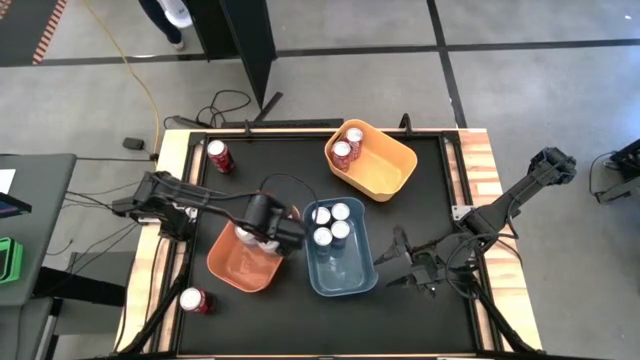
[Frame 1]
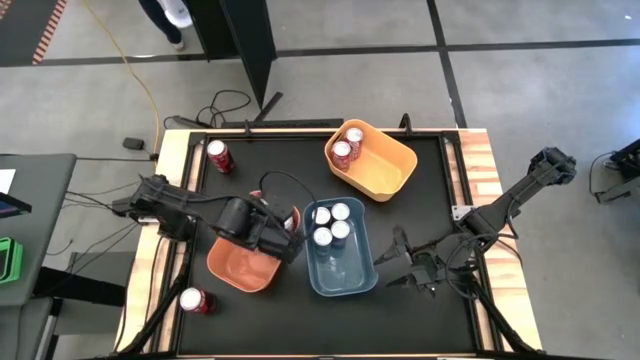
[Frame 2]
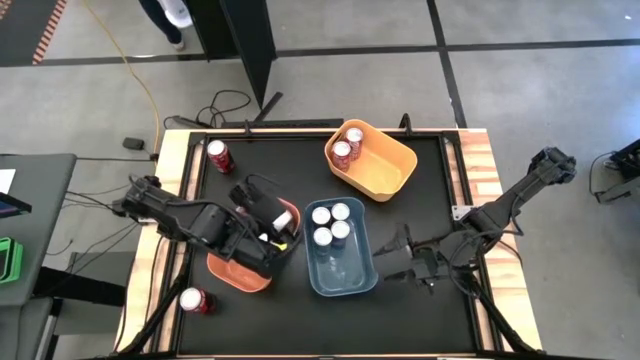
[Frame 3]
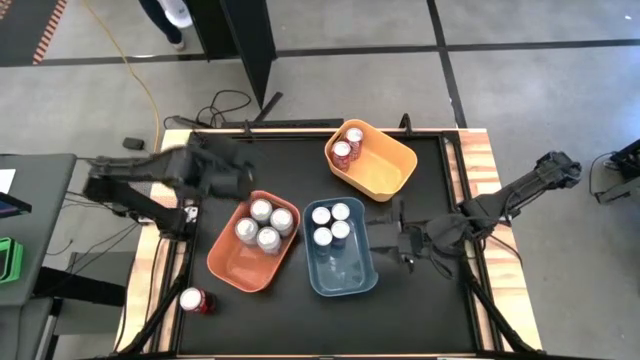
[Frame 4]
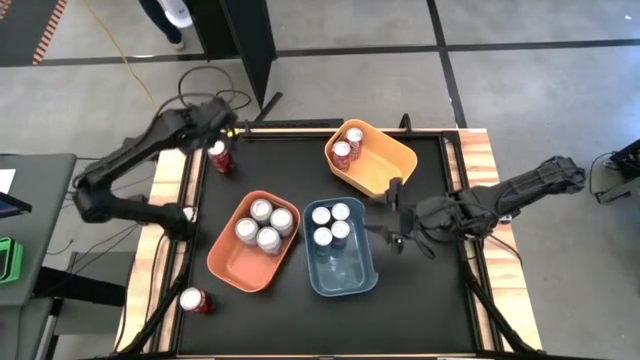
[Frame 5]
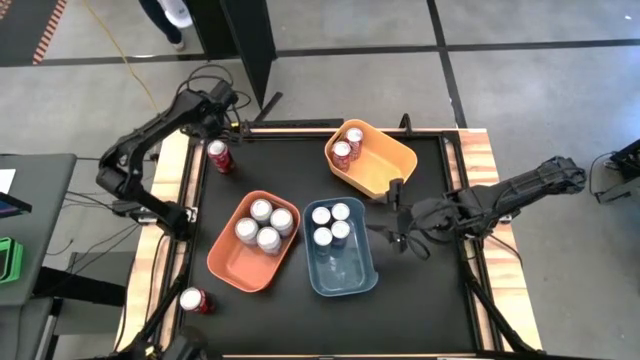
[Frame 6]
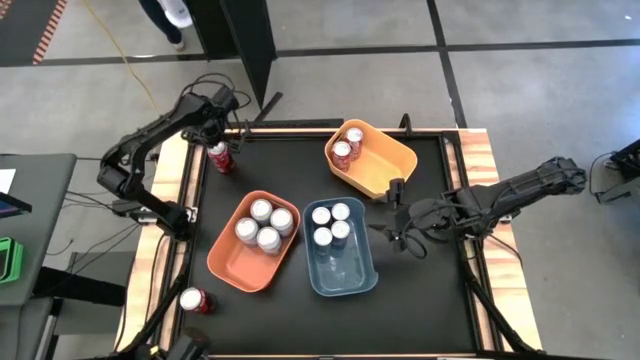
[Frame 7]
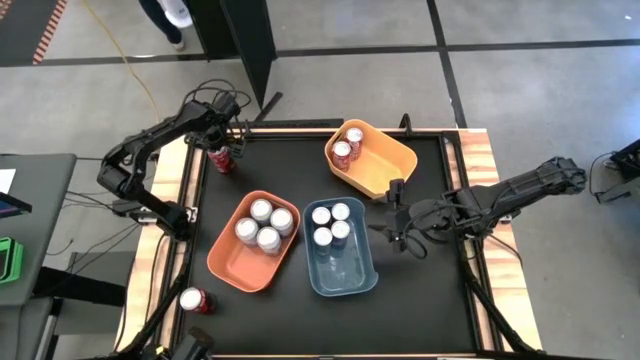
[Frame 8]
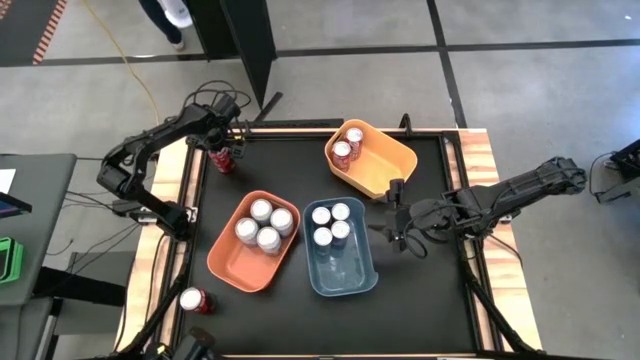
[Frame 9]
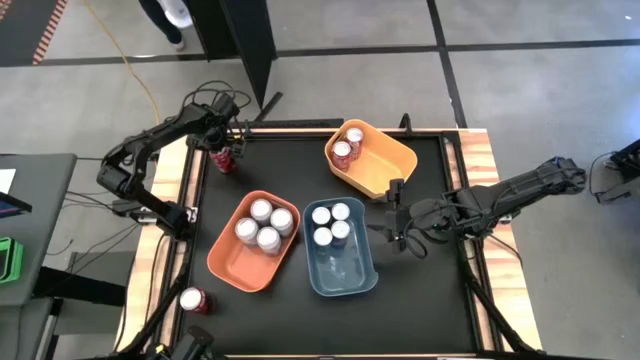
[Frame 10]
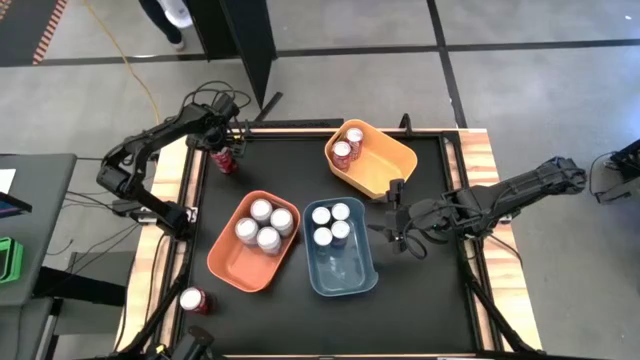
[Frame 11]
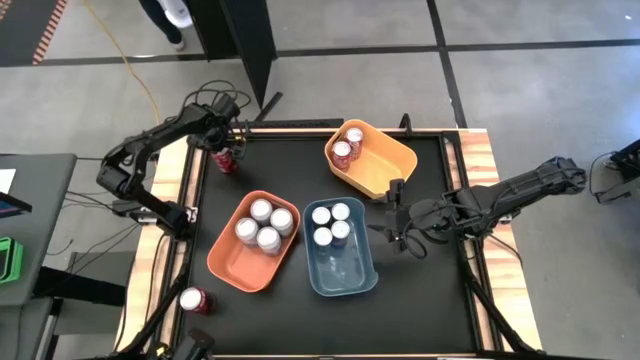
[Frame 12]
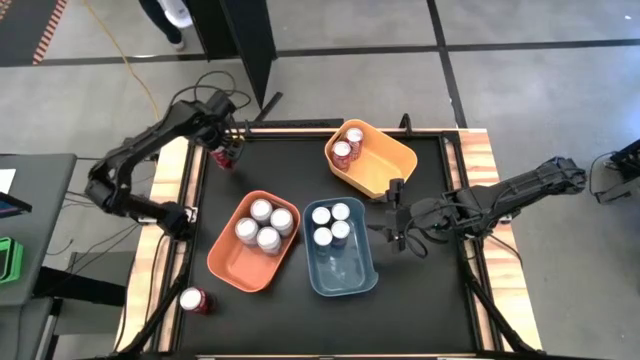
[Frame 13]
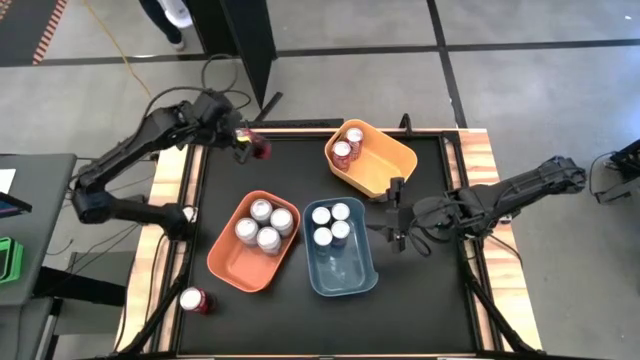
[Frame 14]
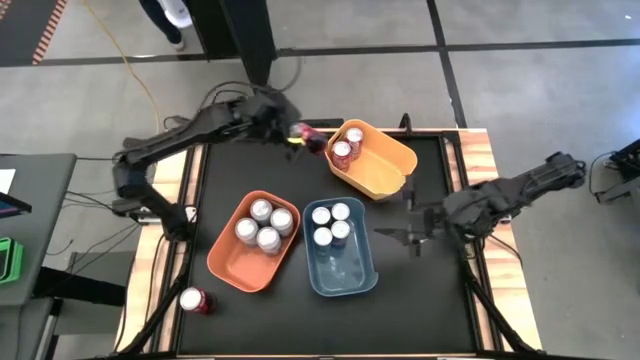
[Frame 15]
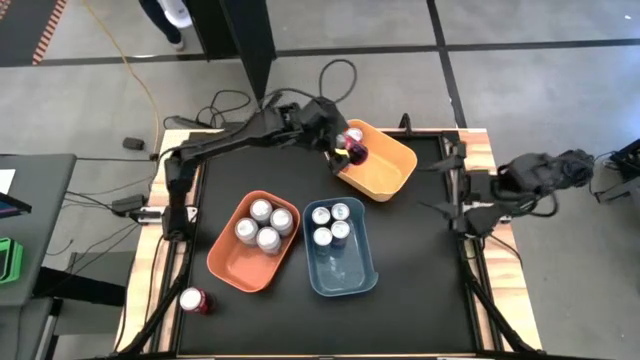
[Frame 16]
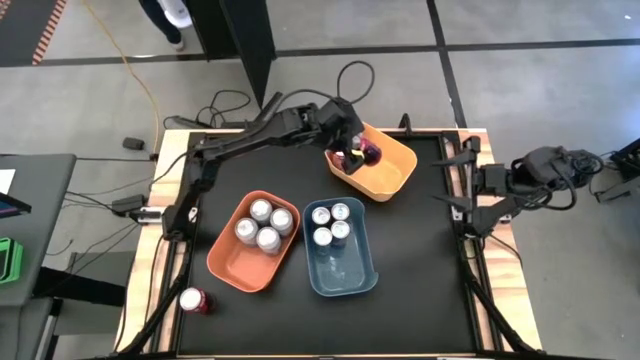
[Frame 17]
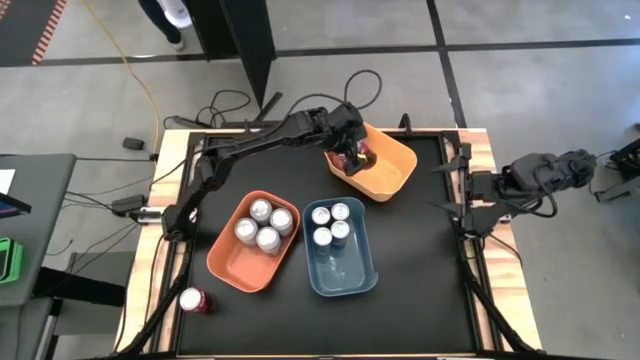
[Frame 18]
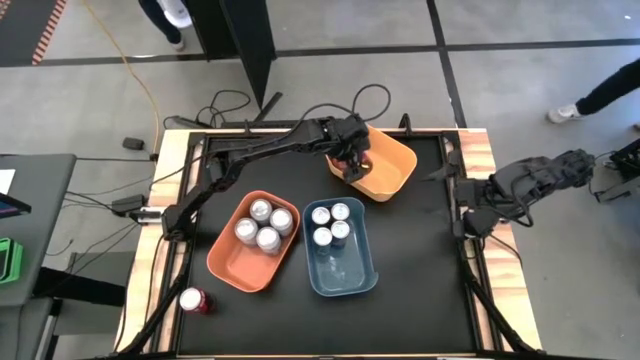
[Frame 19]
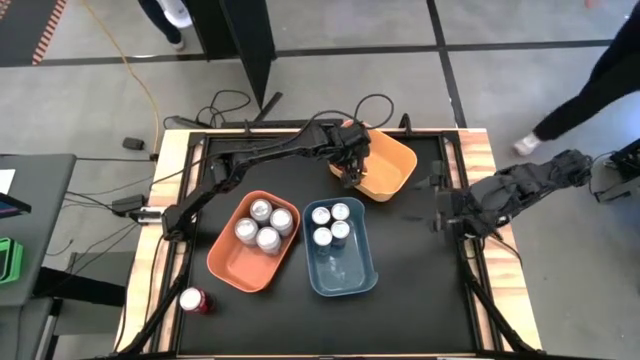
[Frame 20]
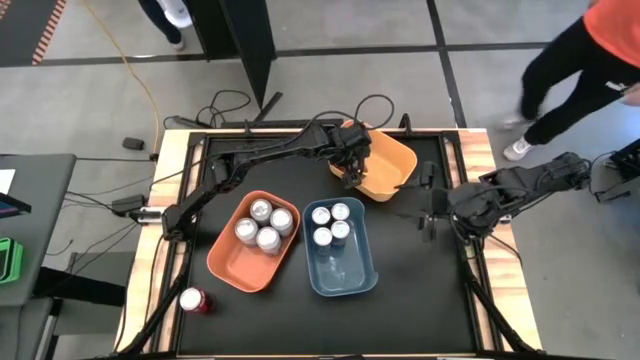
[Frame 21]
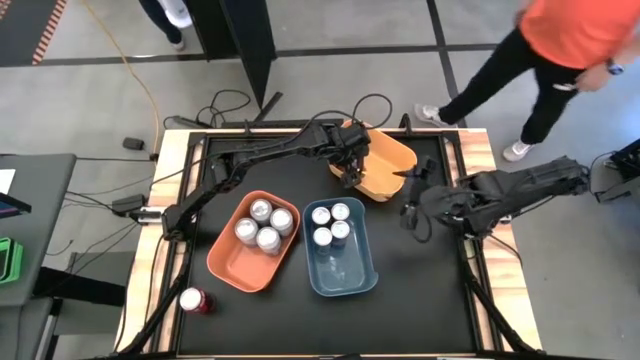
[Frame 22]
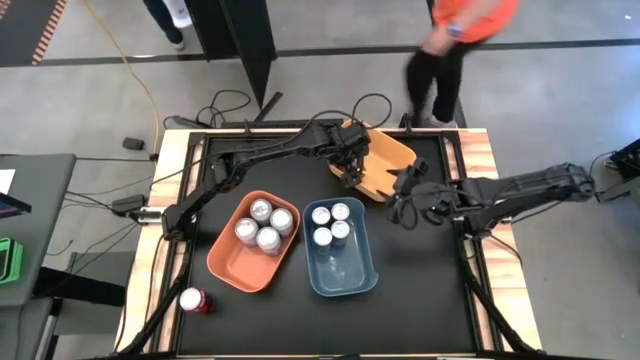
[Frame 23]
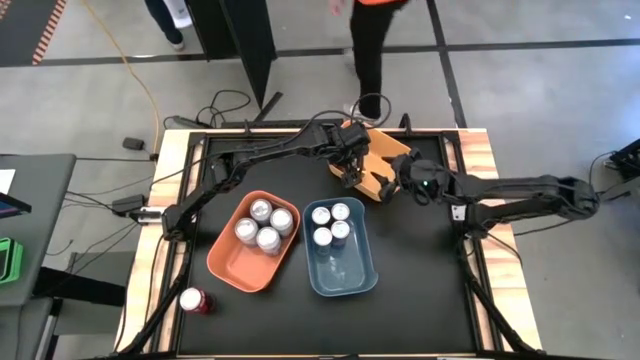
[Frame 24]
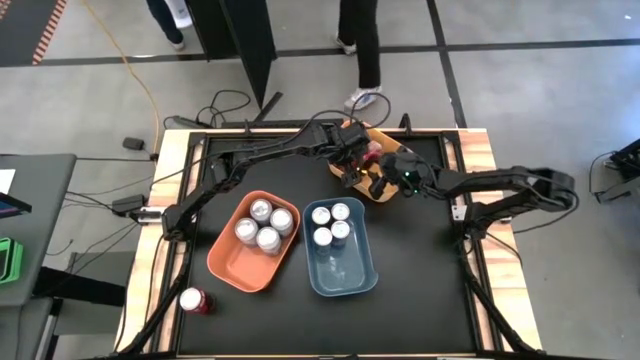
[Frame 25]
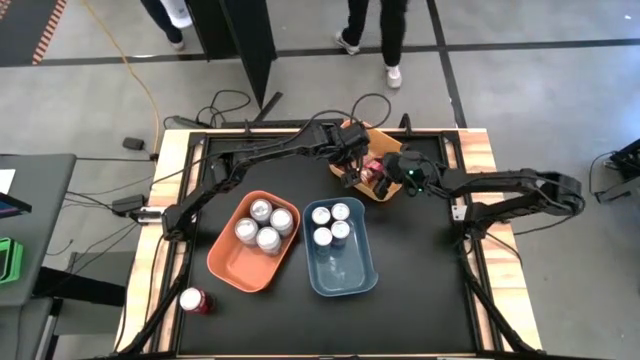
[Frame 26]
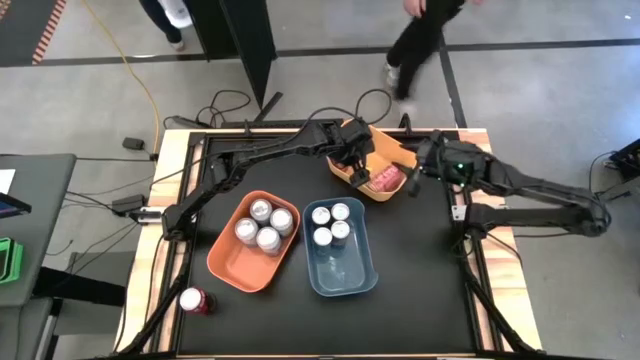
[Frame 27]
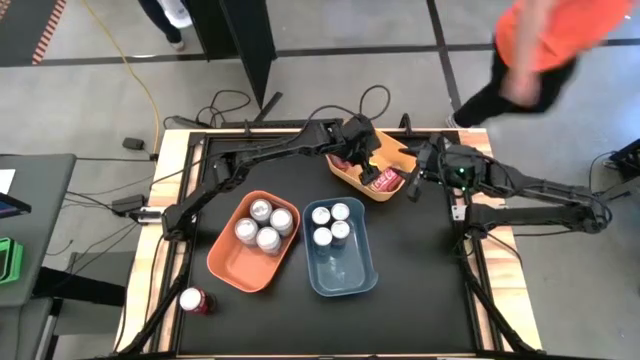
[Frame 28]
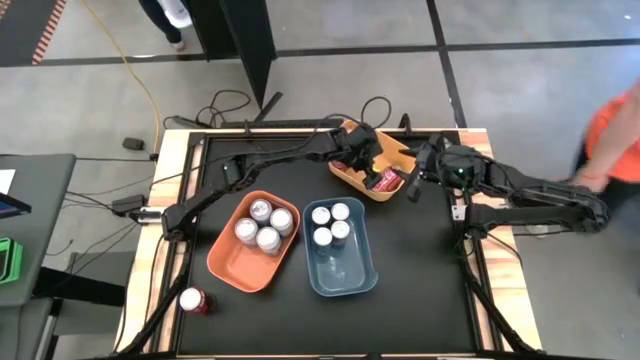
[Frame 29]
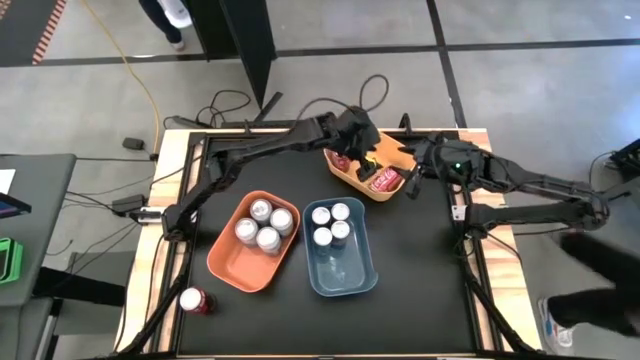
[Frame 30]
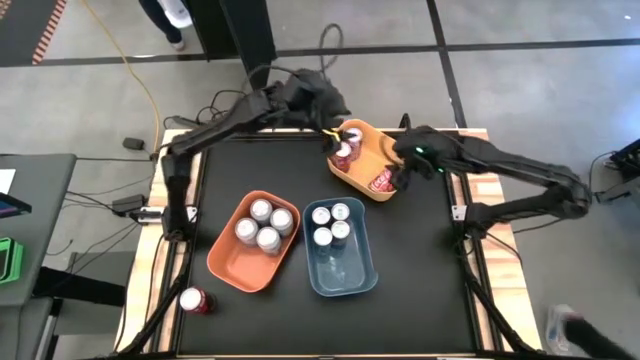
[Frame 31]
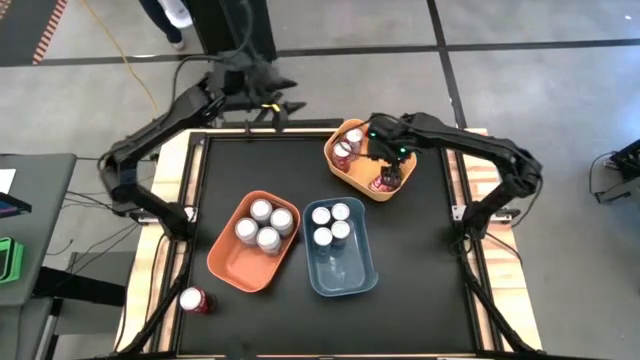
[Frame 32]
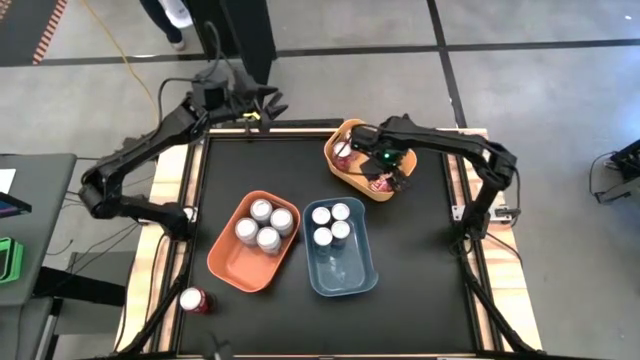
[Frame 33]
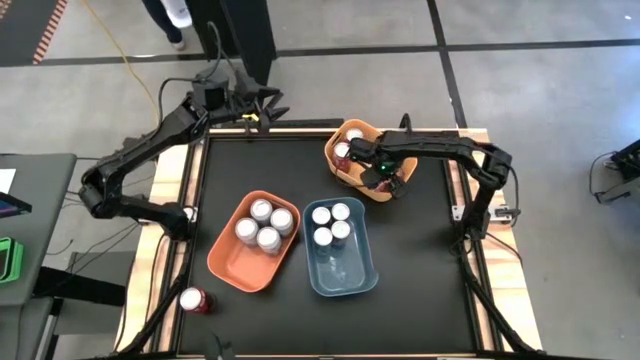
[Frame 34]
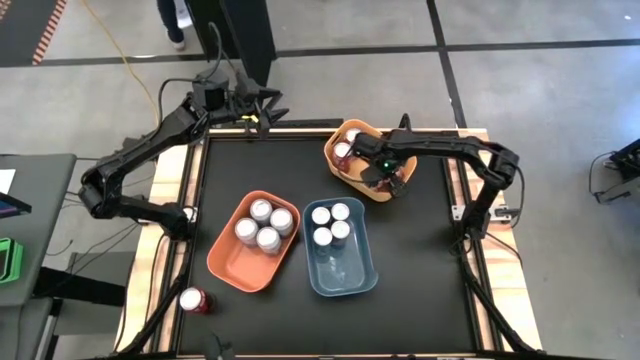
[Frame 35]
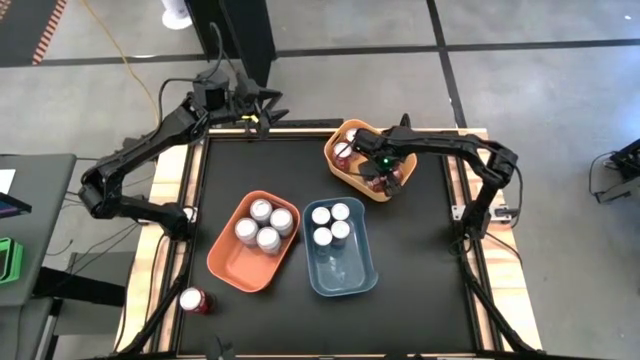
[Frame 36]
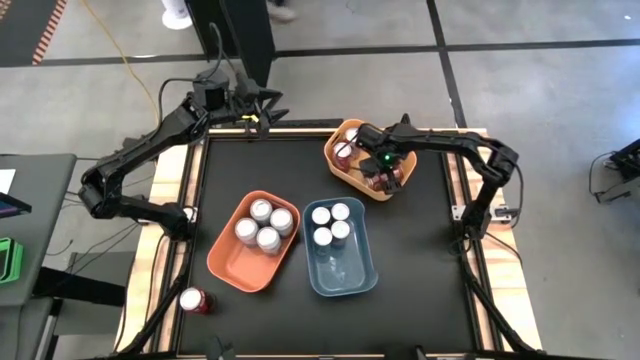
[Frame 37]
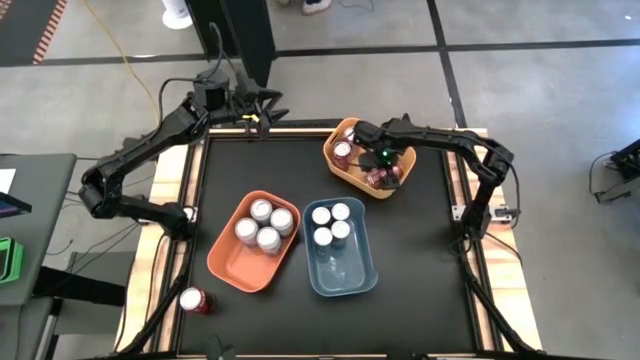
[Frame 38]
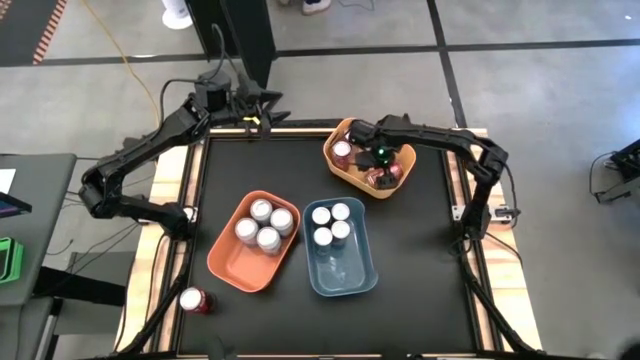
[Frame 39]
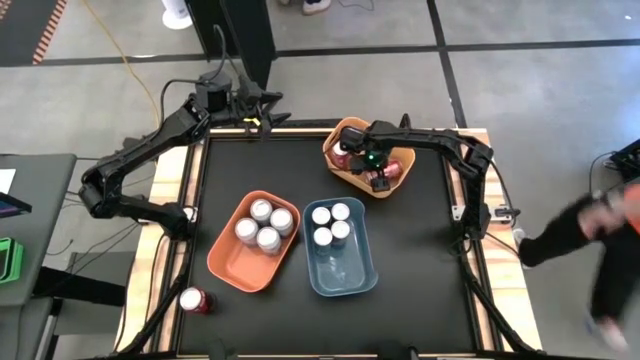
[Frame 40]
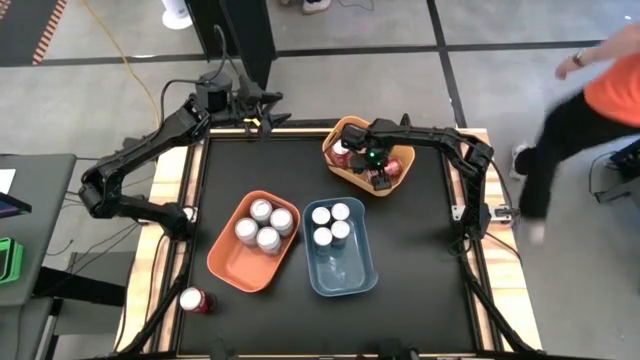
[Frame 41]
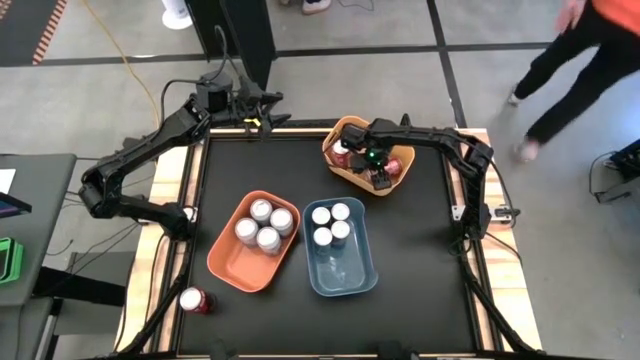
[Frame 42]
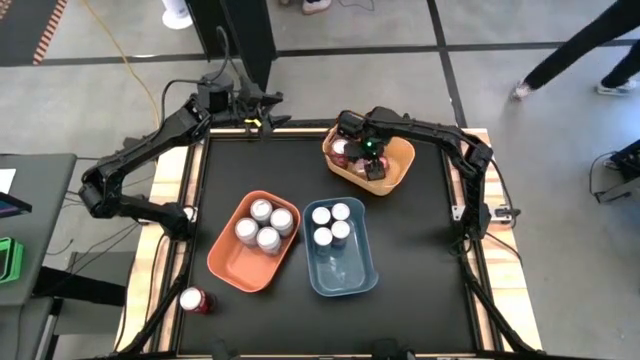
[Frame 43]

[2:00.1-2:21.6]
Task: Sort soda cans
Put the top red soda can into the yellow bin
